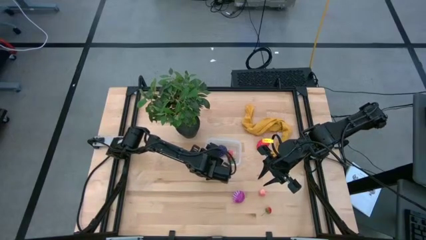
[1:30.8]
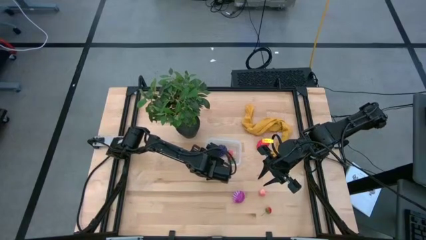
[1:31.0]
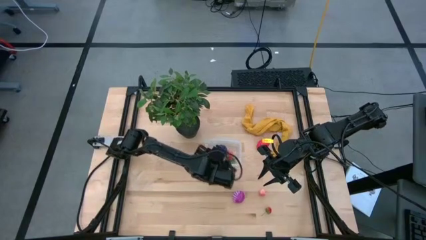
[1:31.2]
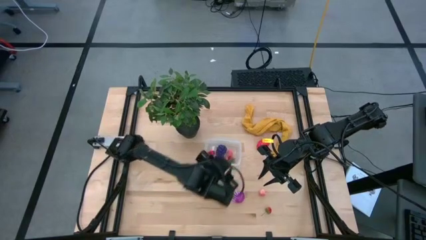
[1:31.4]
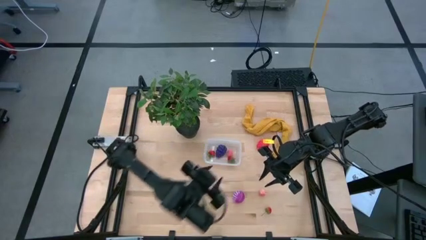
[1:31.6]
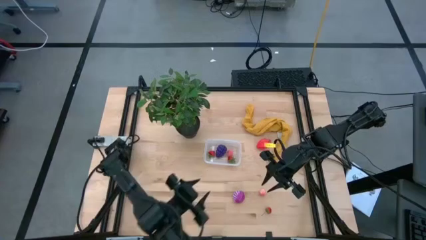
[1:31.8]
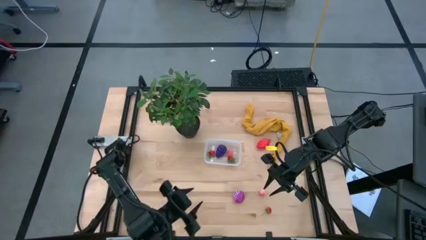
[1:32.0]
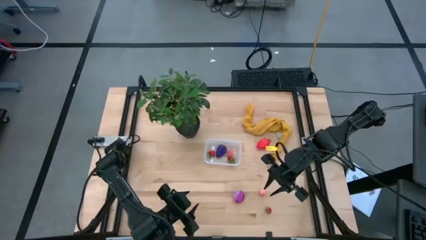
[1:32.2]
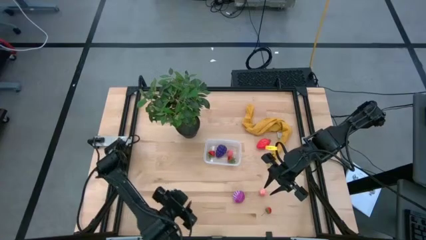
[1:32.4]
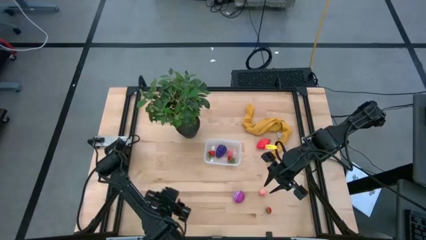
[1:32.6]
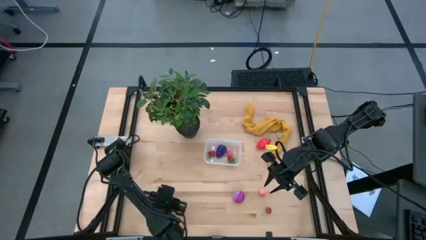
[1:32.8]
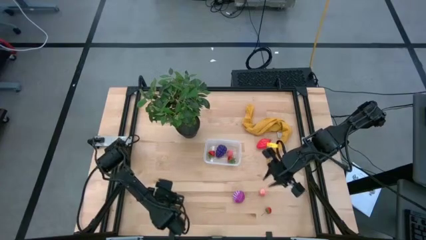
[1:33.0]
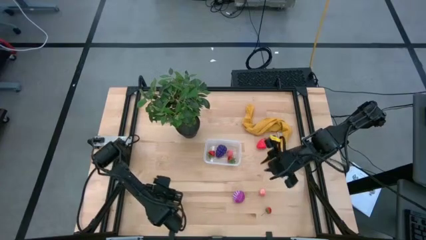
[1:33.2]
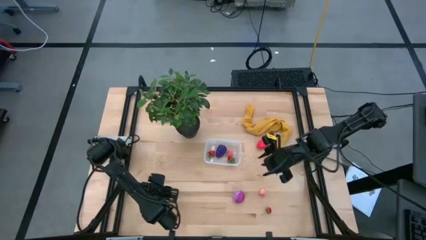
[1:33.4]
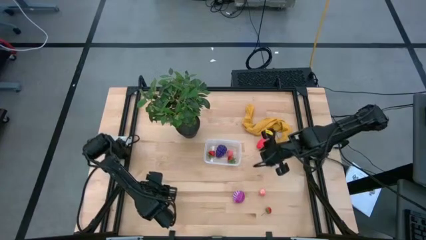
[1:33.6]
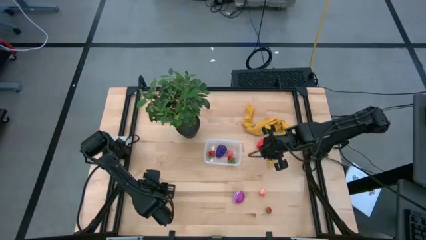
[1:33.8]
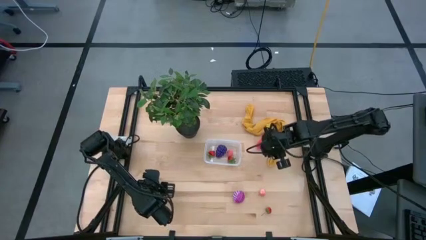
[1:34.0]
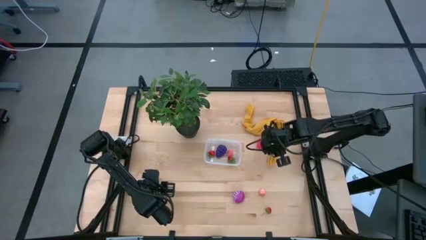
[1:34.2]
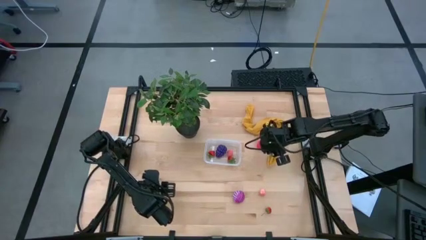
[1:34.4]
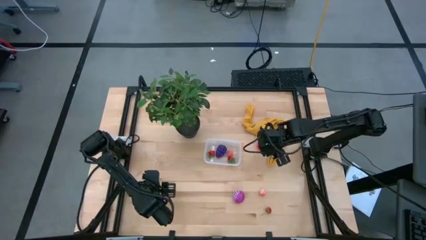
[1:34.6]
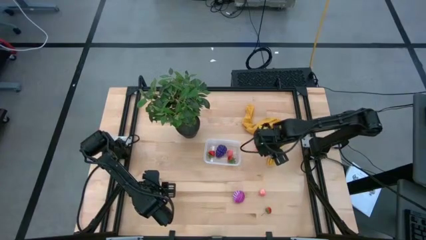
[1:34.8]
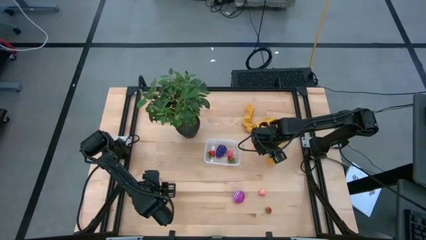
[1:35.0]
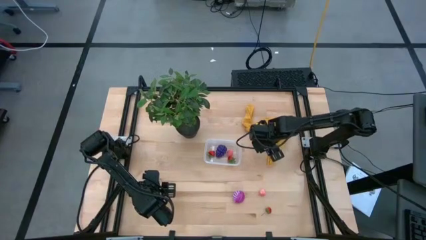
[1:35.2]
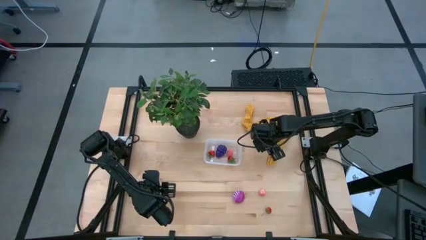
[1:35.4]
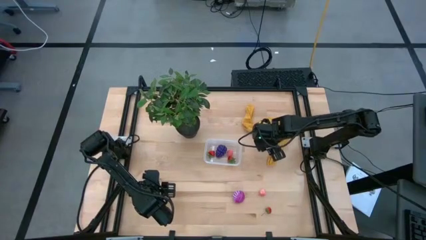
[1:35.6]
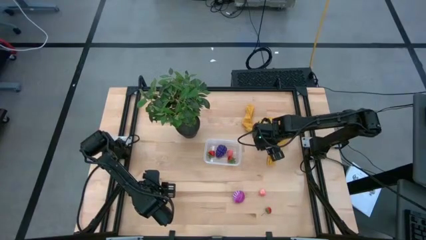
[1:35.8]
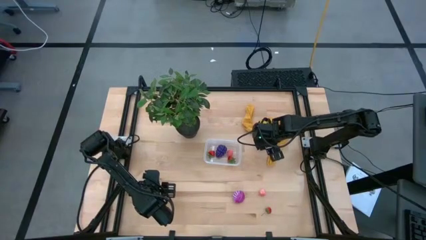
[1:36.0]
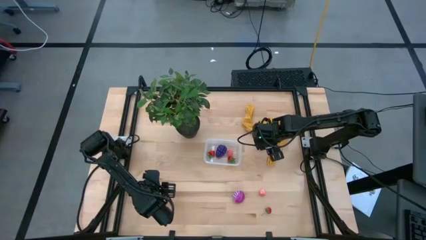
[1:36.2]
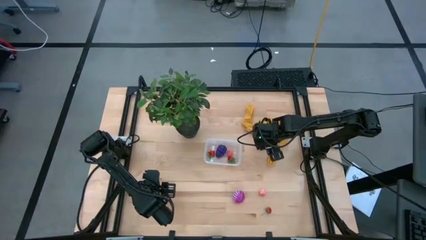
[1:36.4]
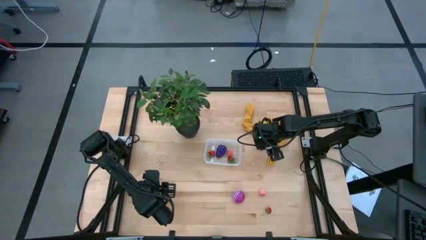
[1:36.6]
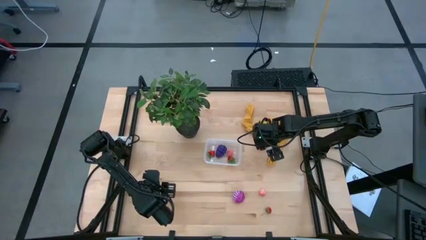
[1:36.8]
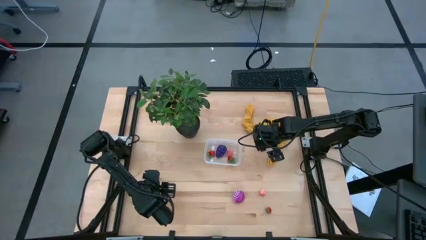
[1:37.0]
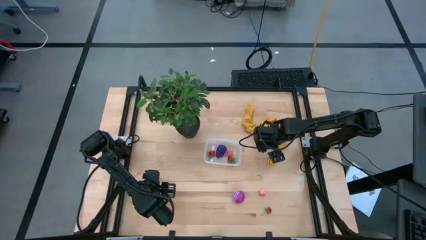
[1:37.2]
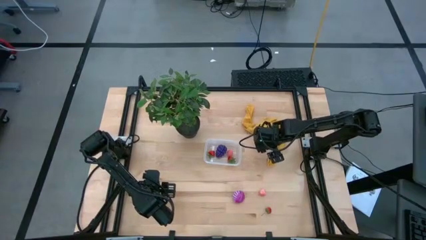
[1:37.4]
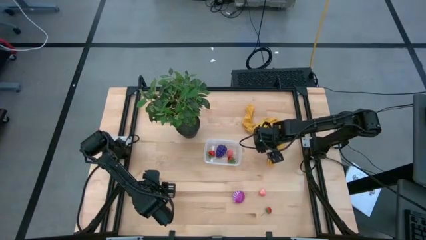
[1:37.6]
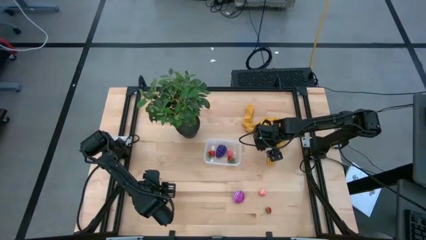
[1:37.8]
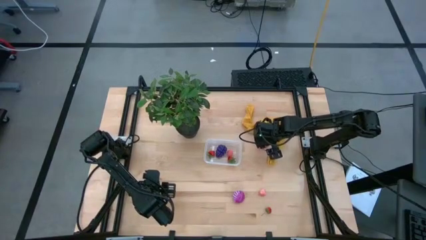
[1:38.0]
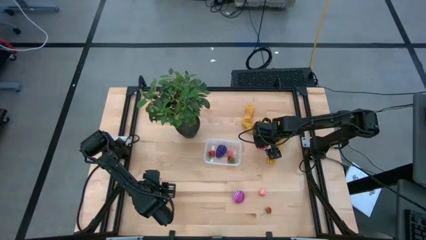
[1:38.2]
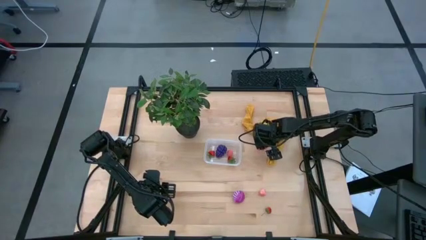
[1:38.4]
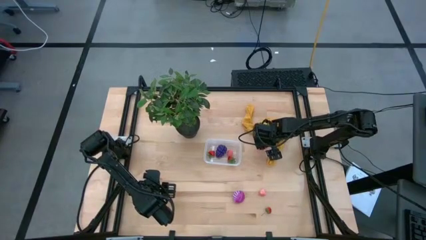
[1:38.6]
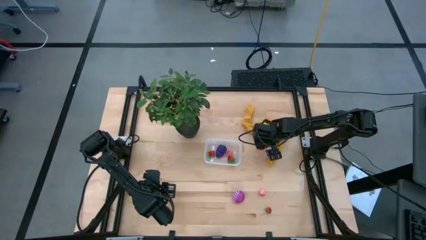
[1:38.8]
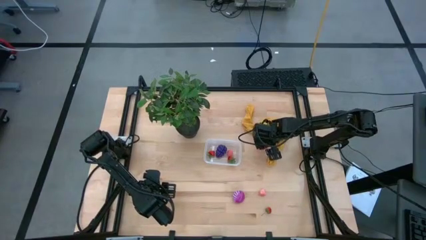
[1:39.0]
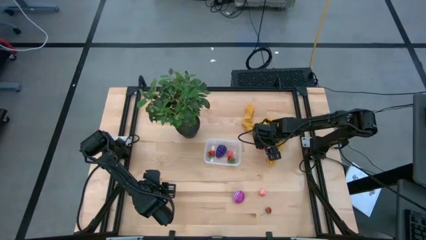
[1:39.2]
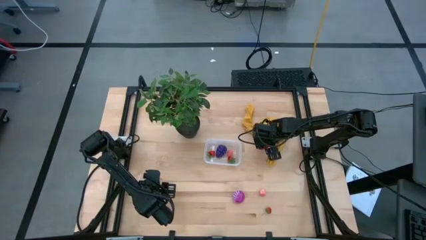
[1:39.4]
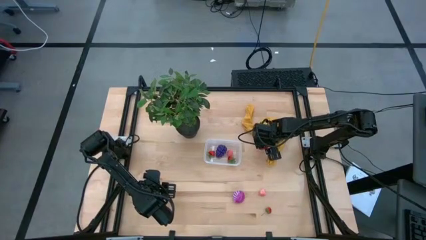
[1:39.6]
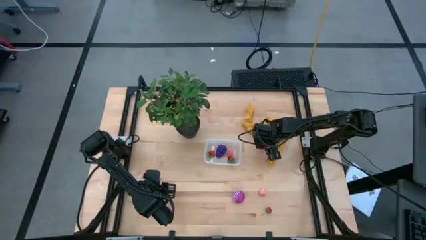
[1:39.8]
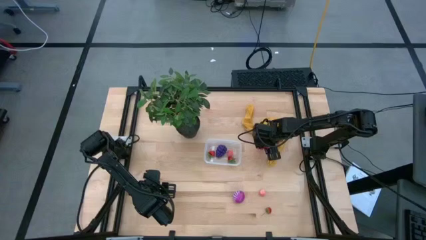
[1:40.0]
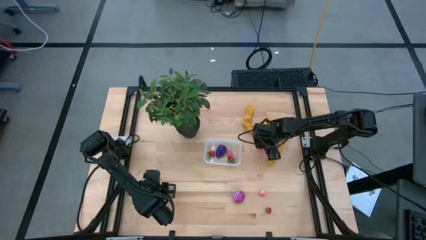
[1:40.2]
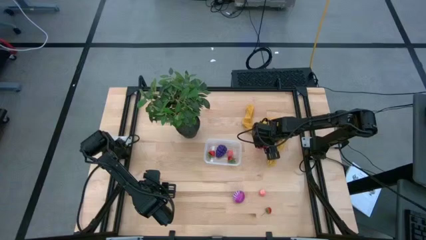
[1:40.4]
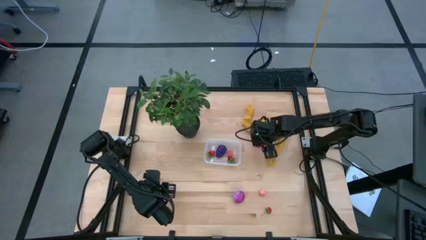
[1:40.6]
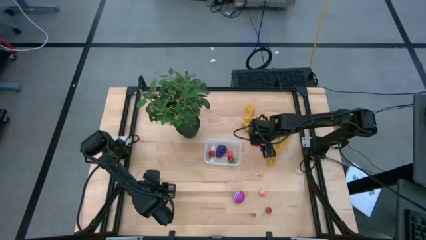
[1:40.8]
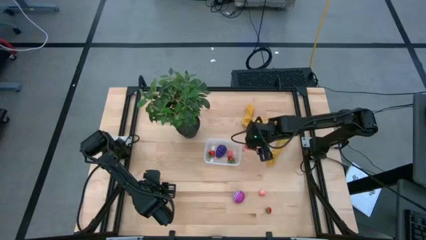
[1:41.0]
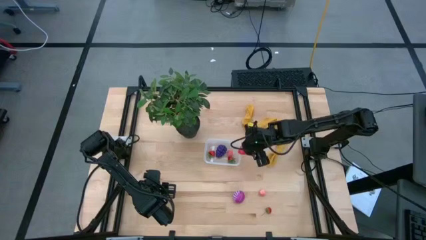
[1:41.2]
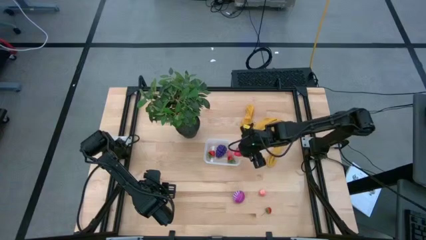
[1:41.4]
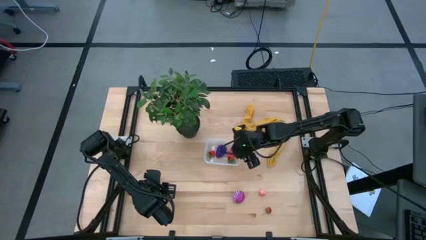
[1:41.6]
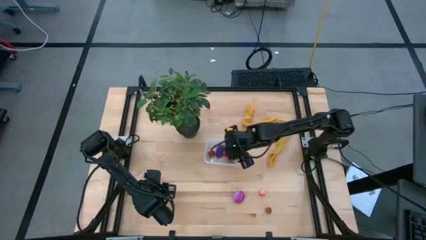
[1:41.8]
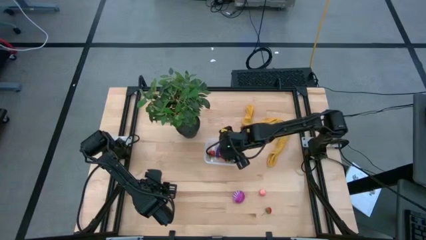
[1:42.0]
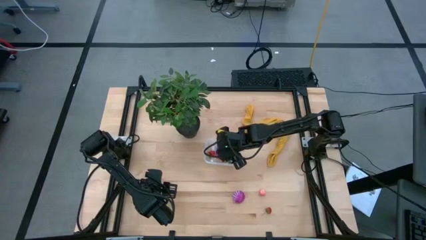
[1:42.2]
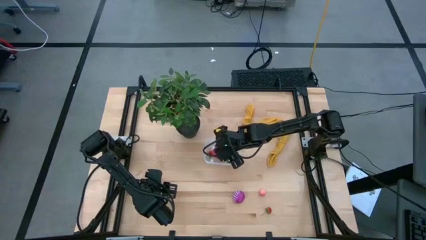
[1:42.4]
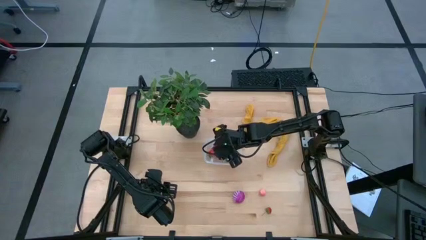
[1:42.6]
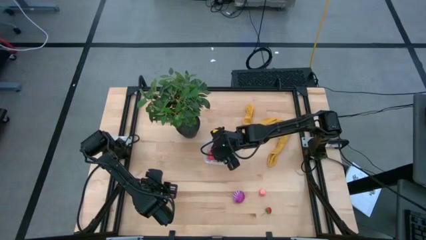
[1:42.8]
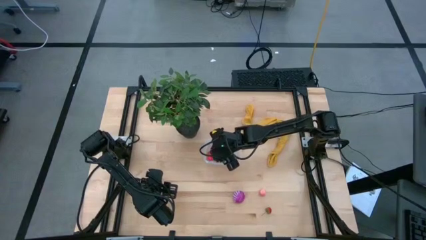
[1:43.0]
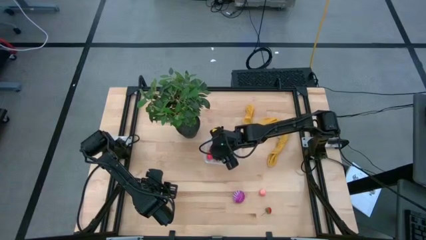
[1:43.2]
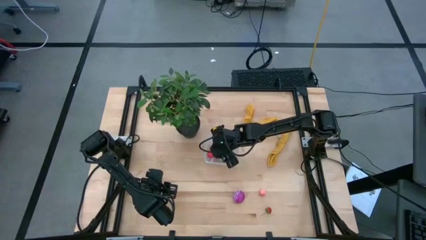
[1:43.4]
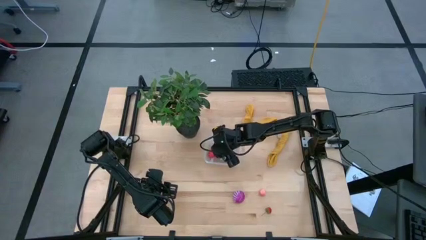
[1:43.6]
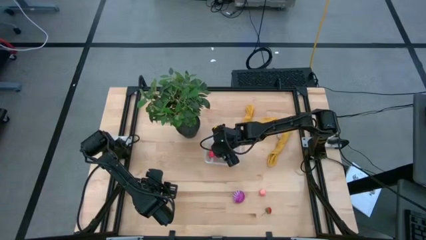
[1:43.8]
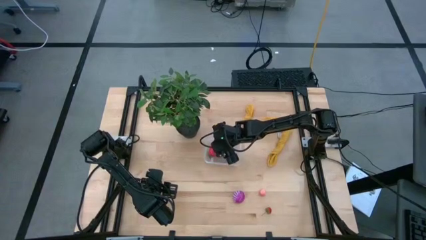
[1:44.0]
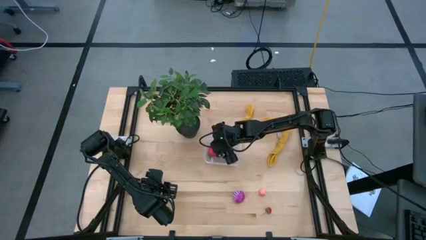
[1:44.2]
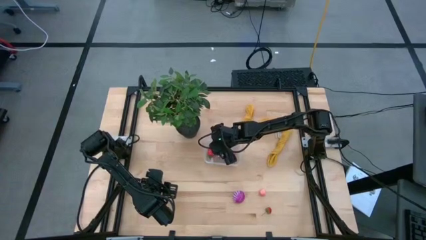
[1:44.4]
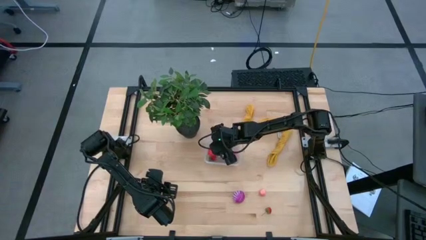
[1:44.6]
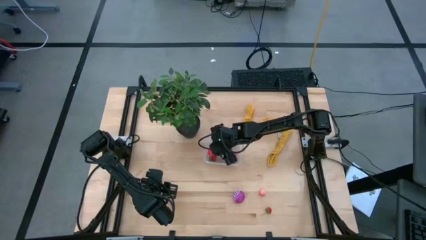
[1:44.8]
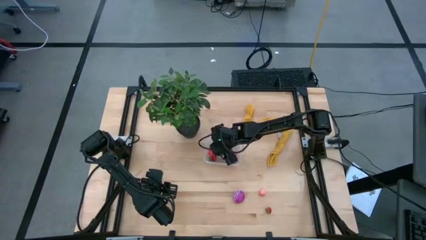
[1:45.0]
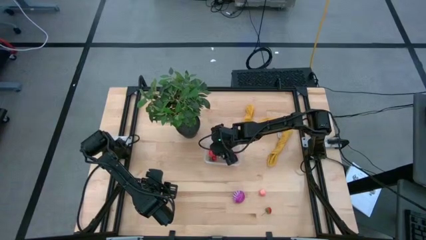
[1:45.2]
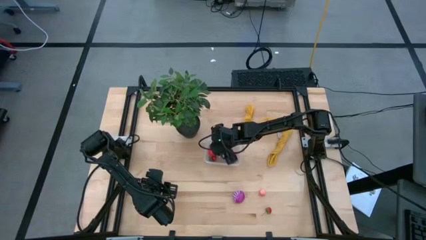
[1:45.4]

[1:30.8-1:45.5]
Task: Pick and placing Produce into tupperware
Put the dragon fruit into the bin

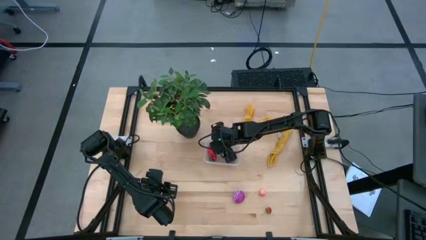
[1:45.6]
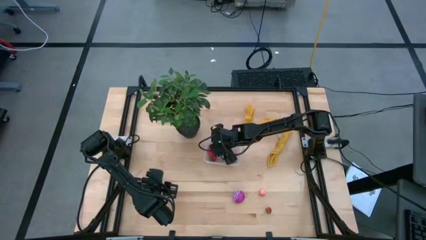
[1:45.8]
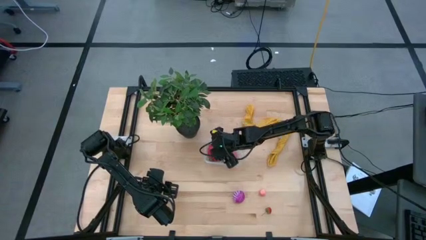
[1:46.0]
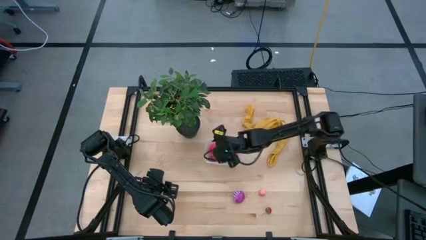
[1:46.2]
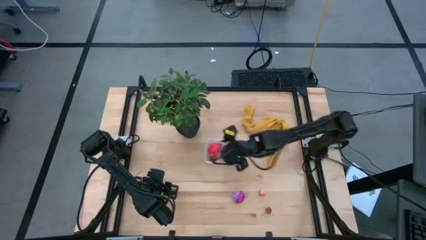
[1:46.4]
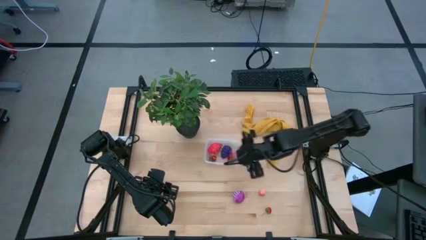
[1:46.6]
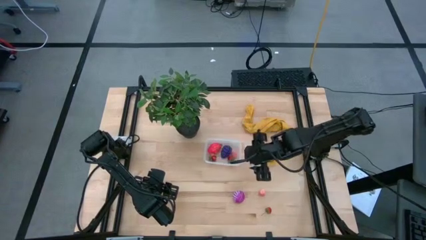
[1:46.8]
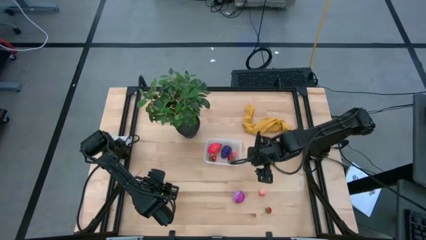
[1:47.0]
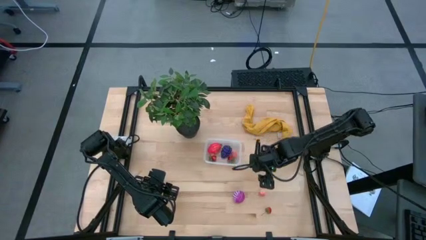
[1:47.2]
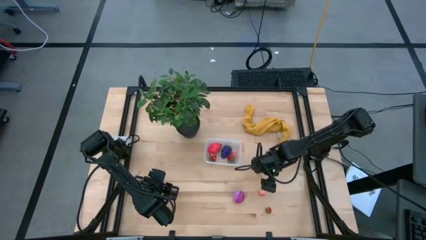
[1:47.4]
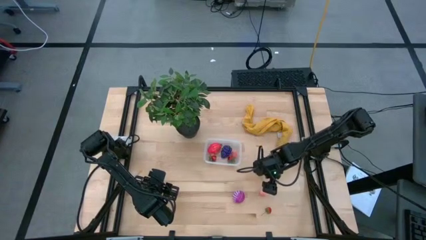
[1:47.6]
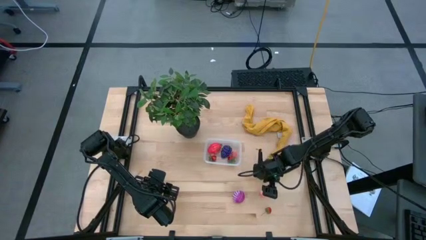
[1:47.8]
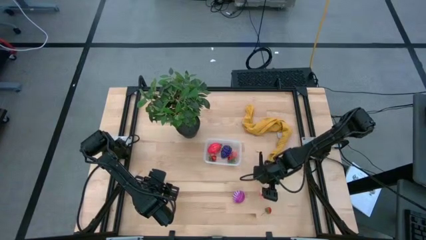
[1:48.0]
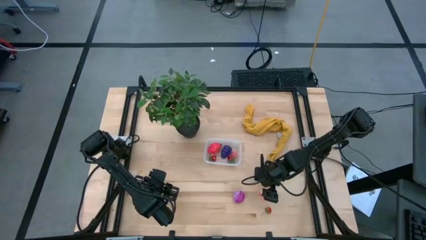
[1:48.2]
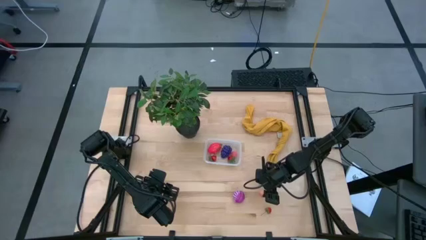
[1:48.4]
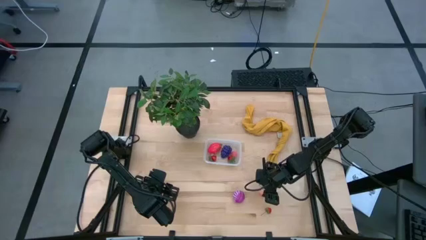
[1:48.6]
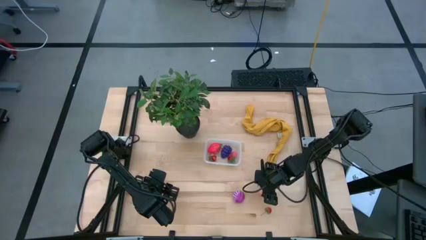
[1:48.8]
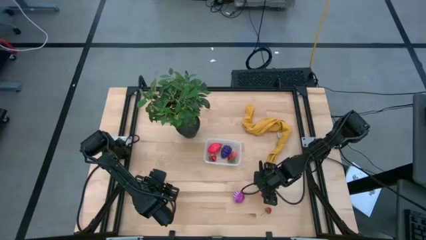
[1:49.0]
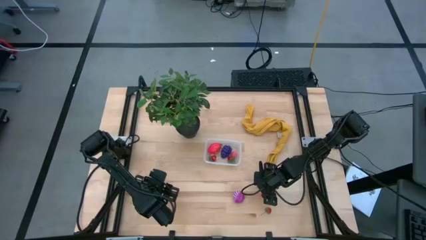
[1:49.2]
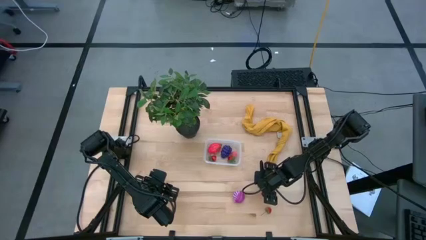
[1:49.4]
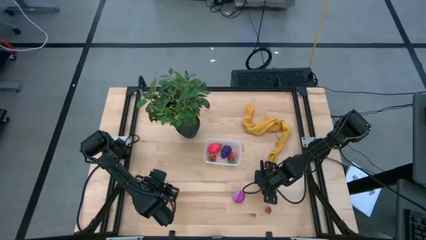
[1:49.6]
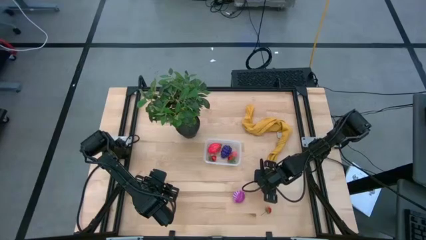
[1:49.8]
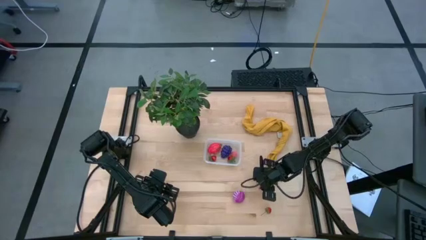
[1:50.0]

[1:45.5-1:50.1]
Put the peach into the bin
